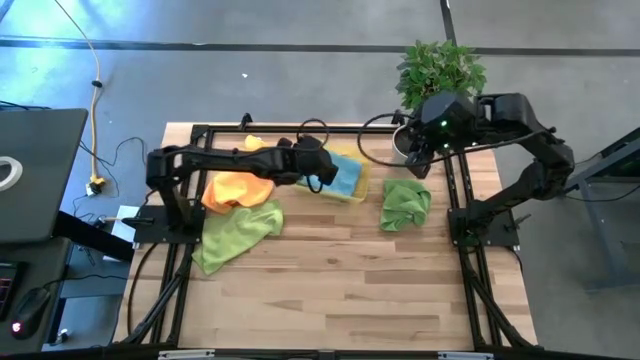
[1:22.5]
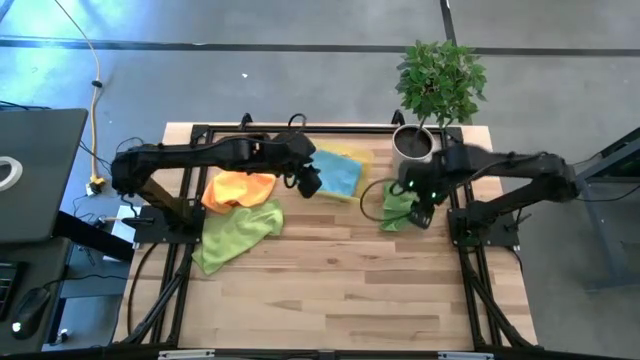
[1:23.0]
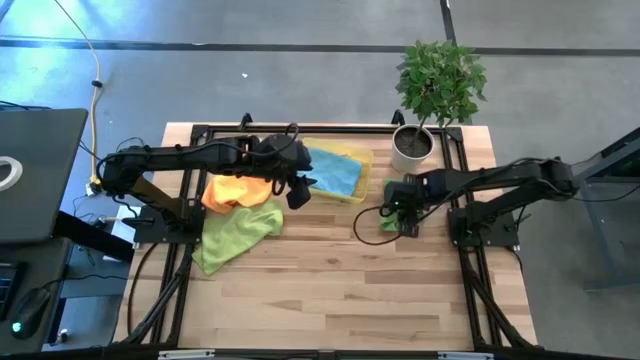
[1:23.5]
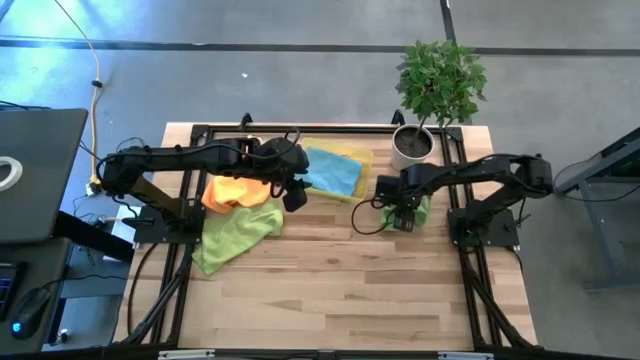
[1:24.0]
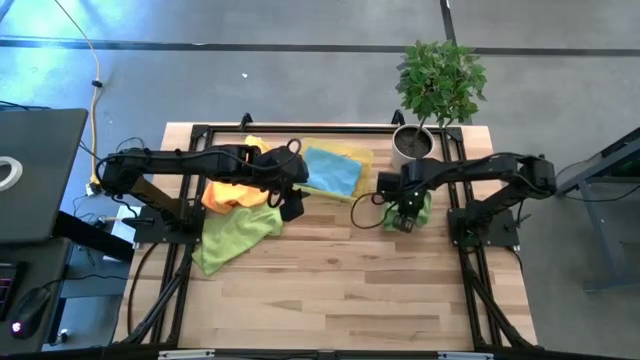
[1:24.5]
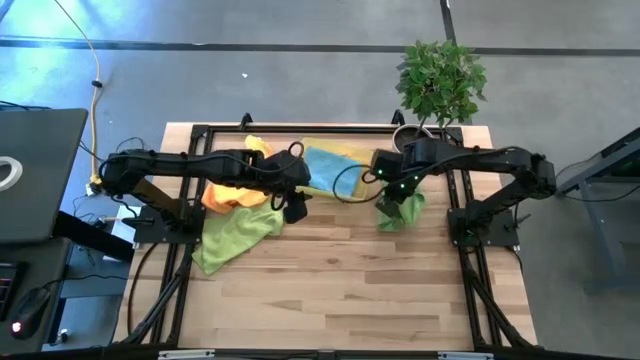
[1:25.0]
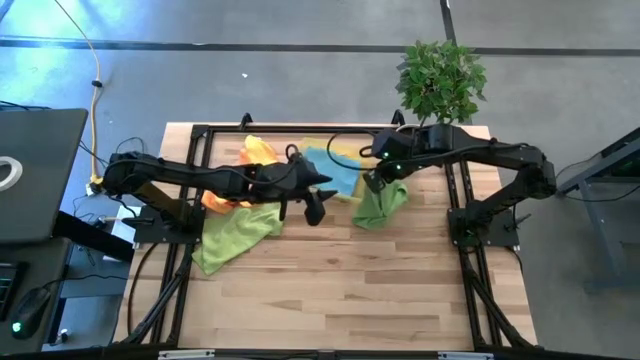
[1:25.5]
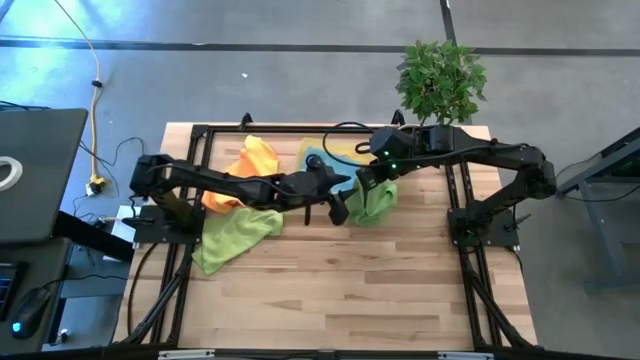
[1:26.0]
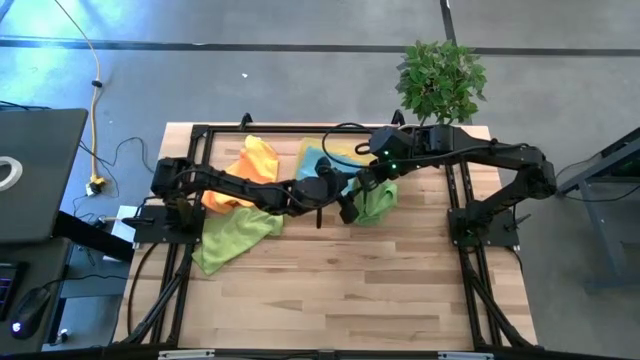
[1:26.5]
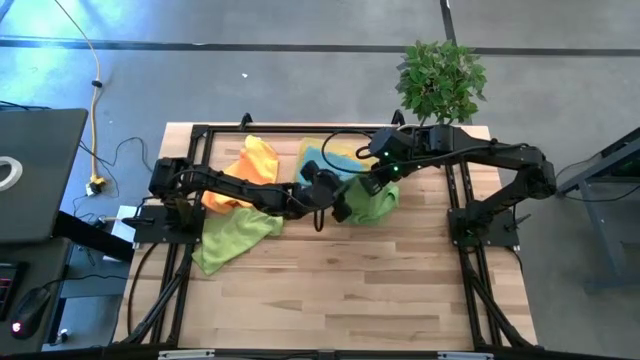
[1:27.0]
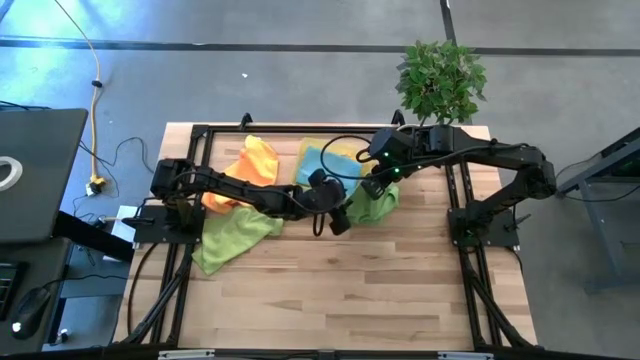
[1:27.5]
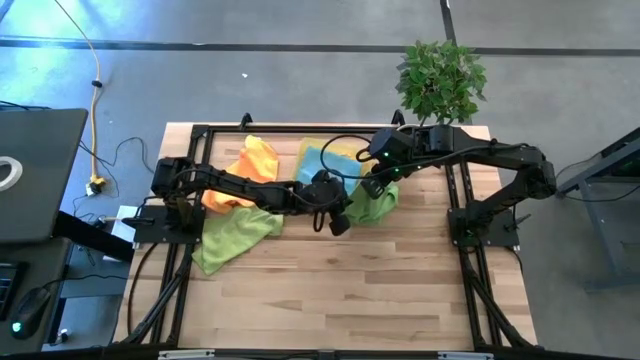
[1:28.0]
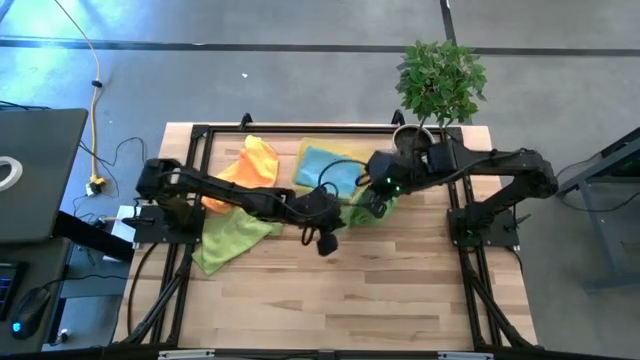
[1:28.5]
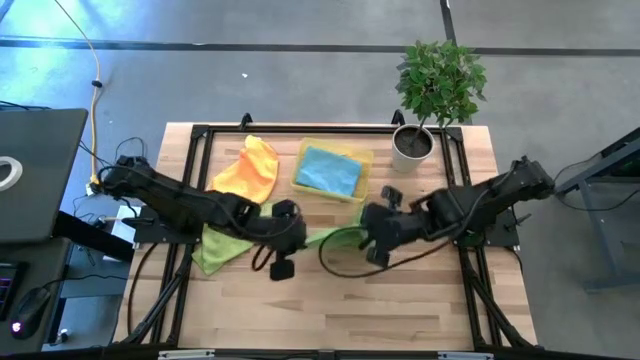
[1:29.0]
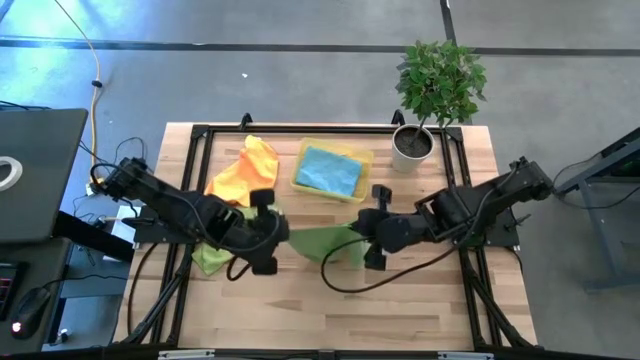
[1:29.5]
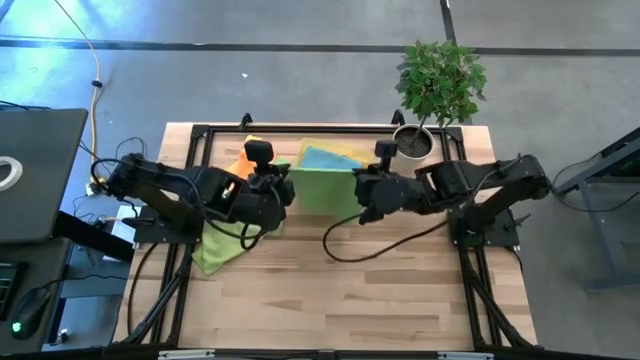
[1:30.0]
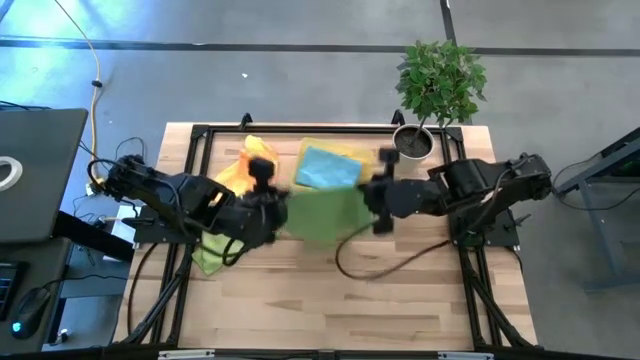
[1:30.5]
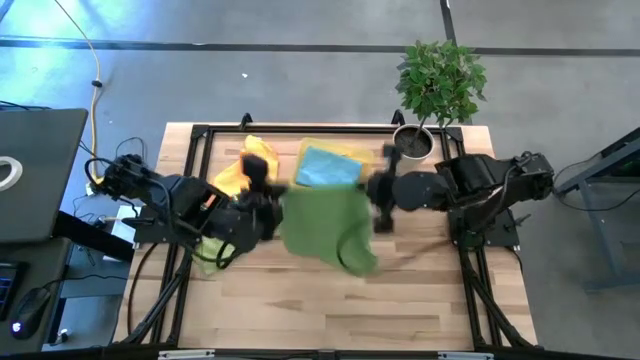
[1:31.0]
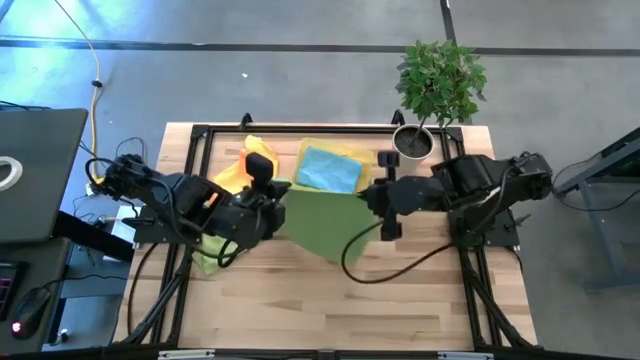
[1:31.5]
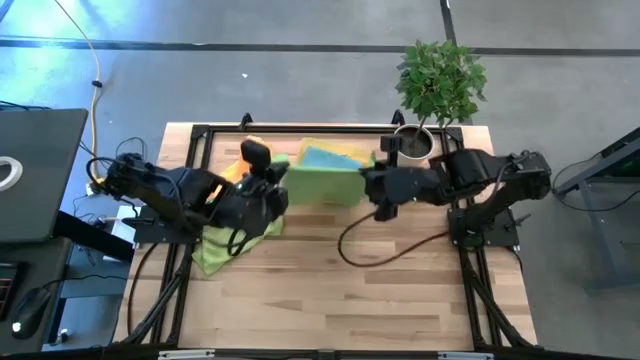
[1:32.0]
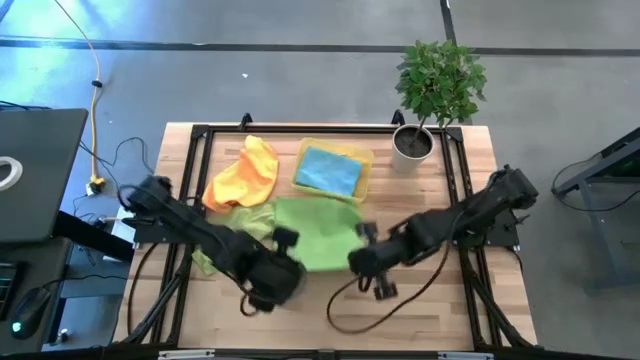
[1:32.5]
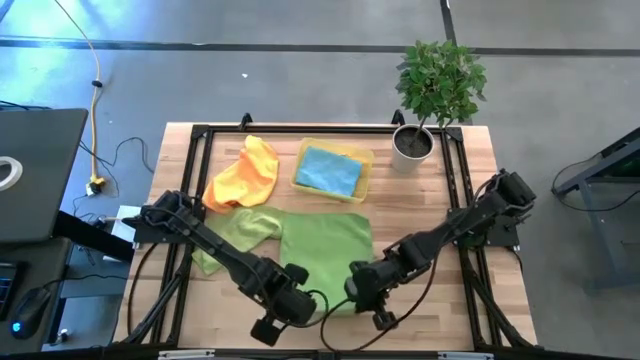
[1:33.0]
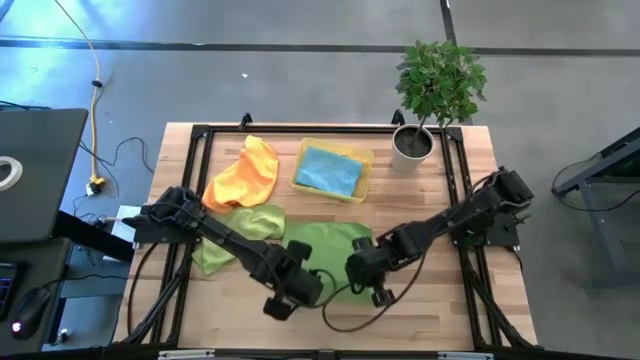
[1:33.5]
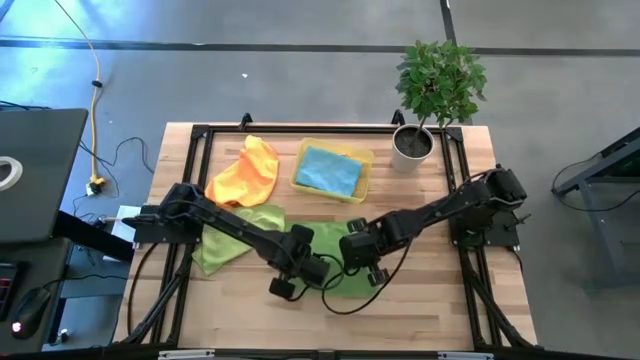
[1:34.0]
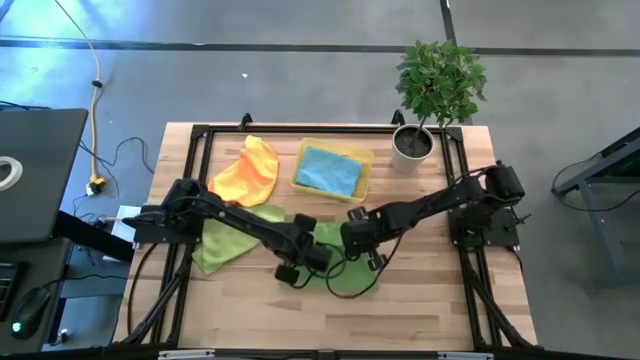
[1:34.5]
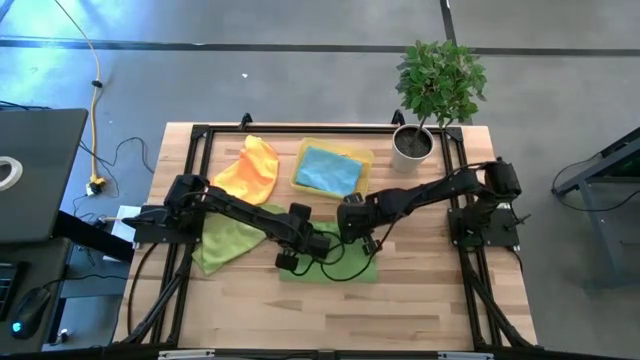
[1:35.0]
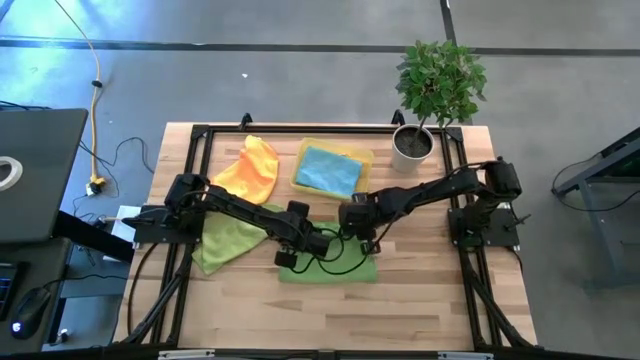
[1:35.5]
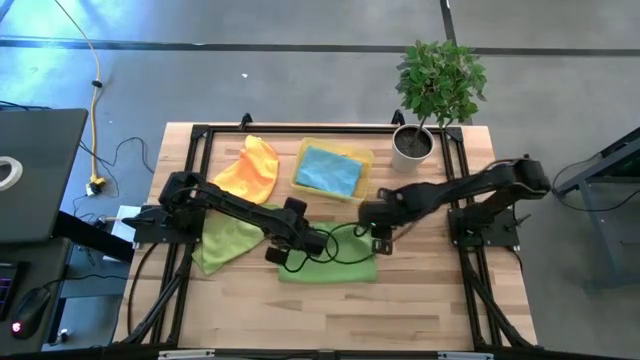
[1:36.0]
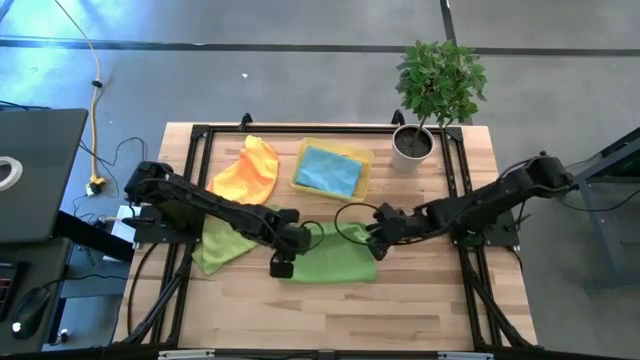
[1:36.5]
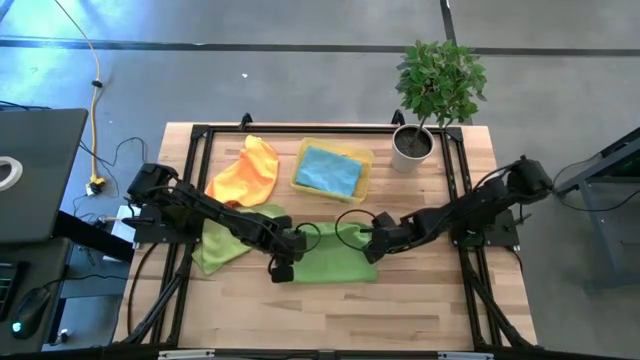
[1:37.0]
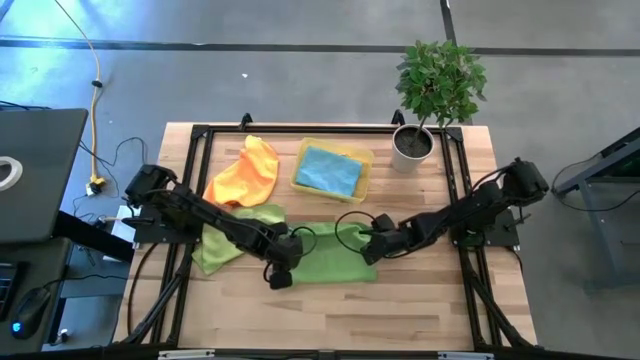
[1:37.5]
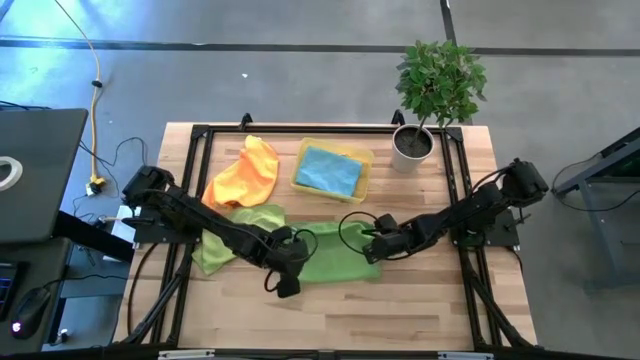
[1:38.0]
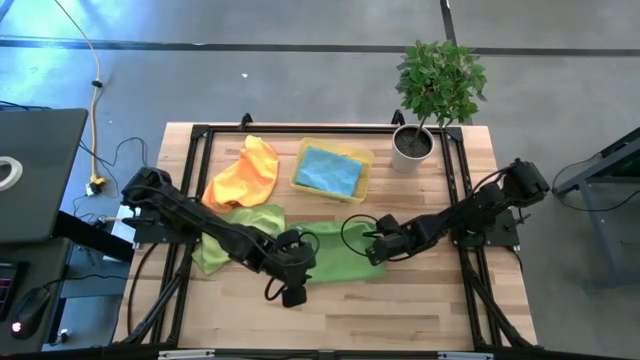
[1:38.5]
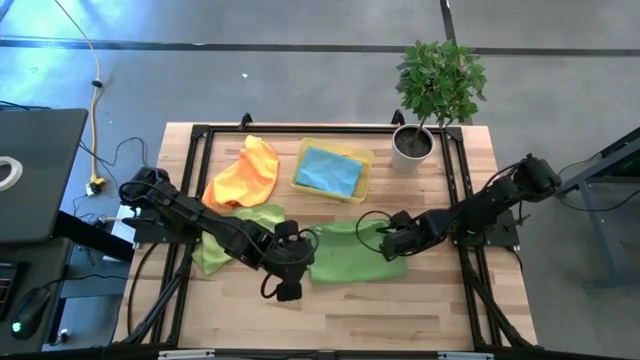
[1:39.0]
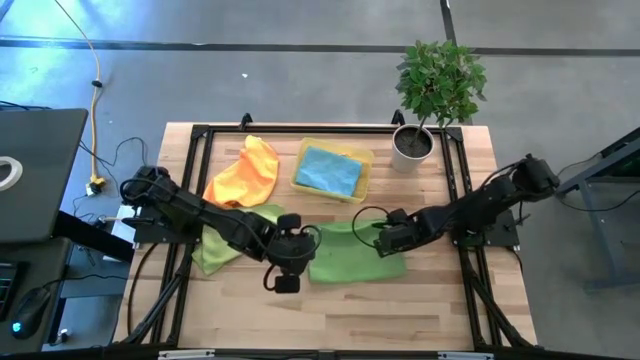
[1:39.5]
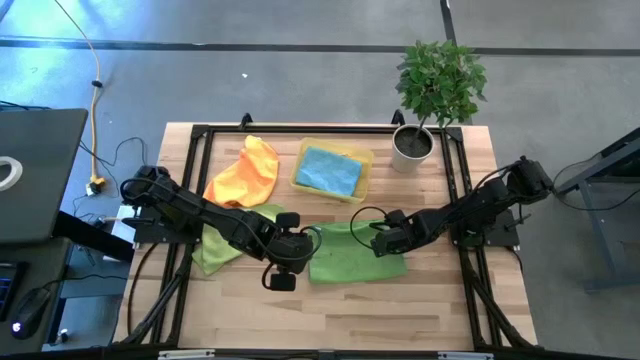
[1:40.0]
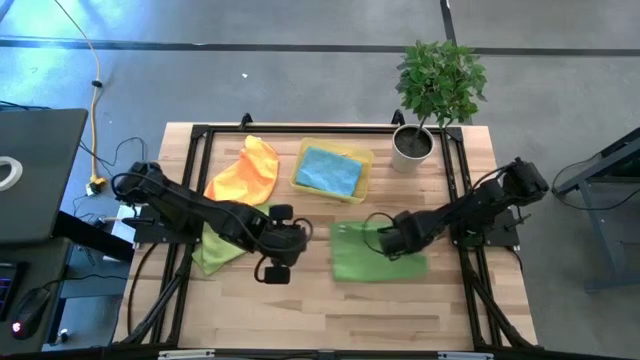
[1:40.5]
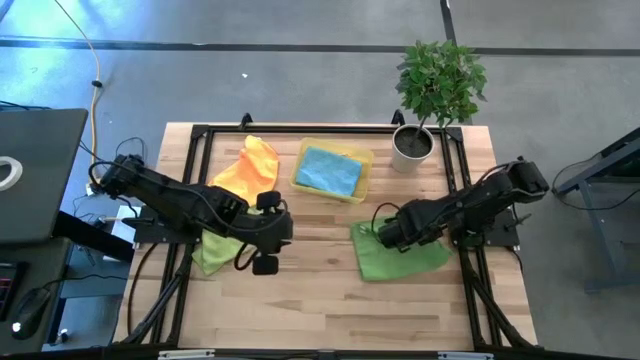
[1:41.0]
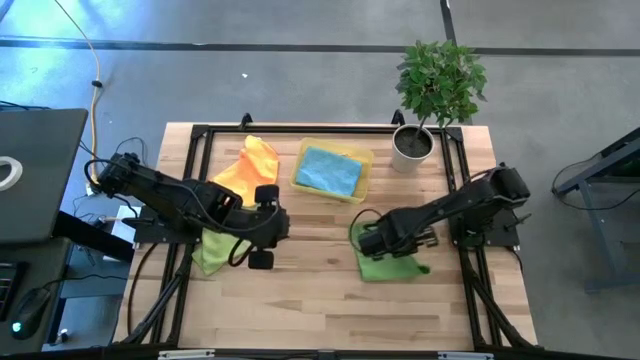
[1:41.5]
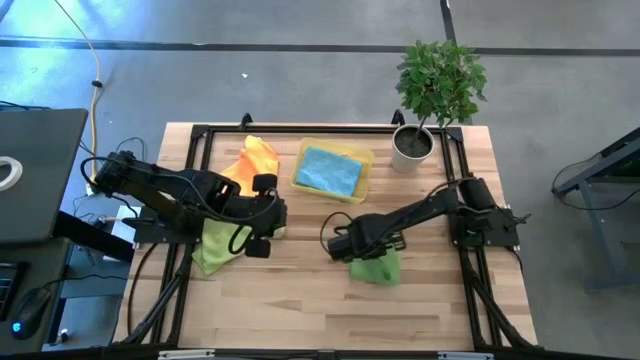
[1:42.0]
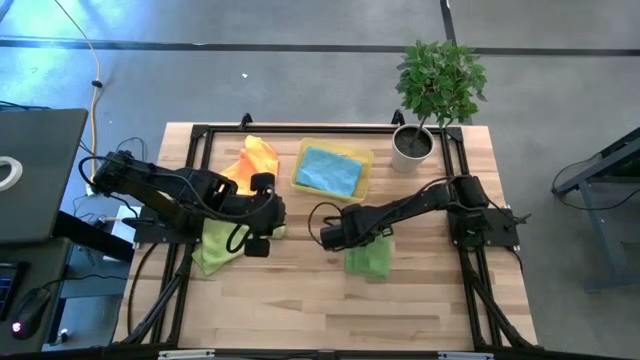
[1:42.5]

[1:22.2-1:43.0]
Task: Fold microfiber towels
Fold the right green microfiber towel

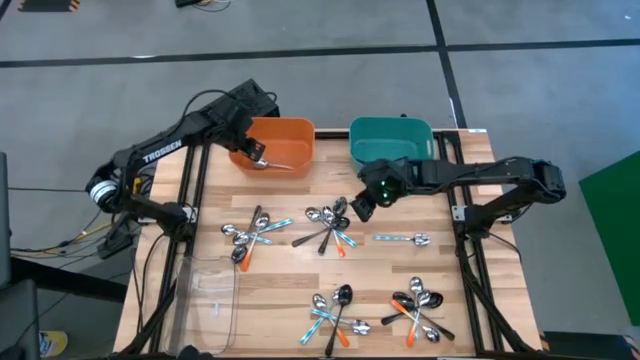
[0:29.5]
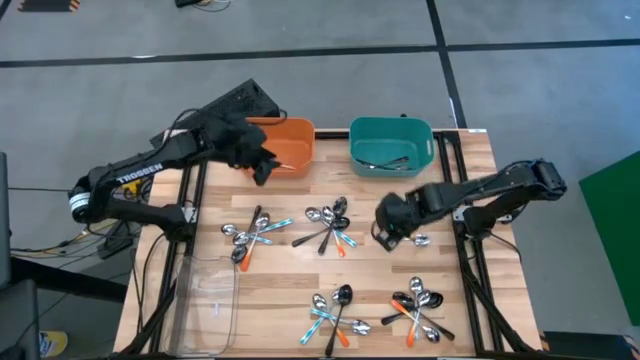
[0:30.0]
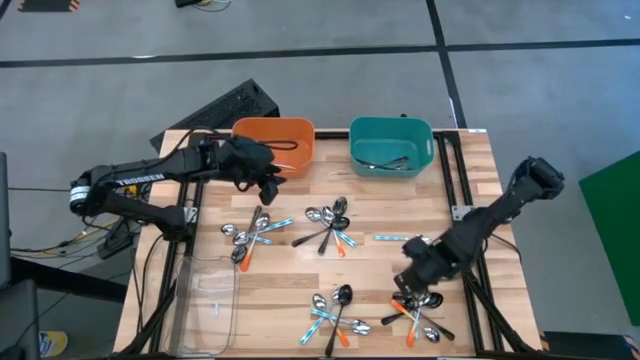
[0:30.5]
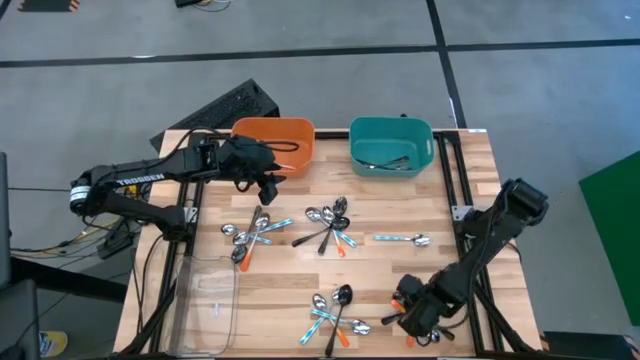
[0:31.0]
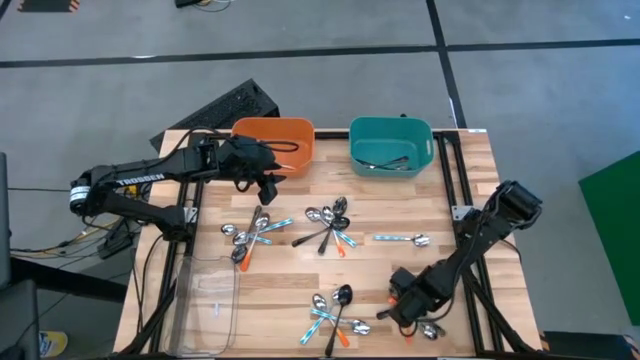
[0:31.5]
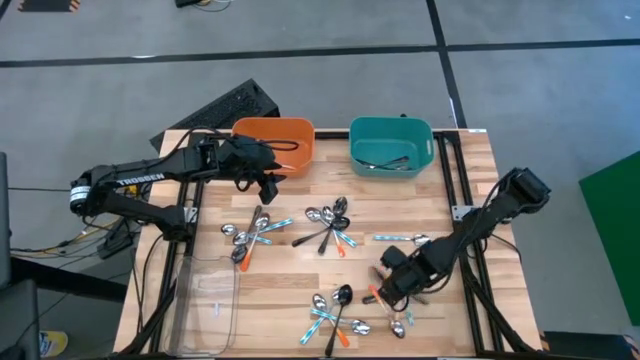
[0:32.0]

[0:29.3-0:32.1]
Task: Sort silverware by color (type)
Put the black spoon into the blue bin
